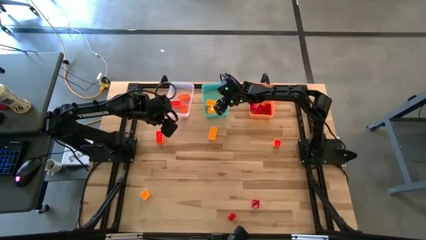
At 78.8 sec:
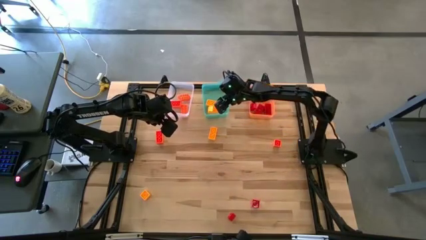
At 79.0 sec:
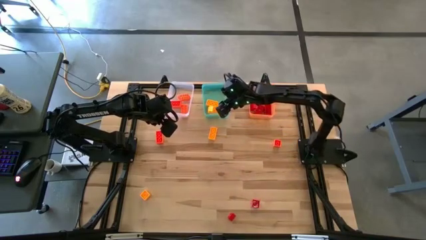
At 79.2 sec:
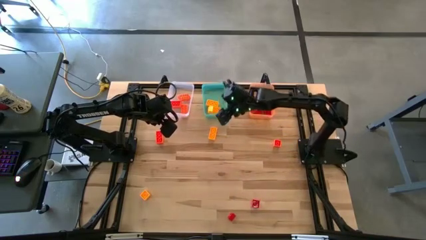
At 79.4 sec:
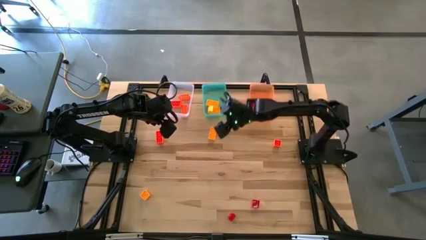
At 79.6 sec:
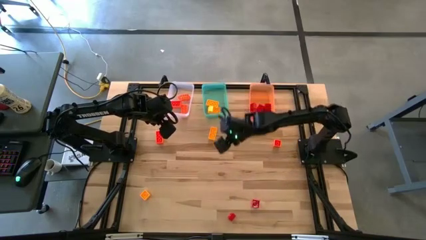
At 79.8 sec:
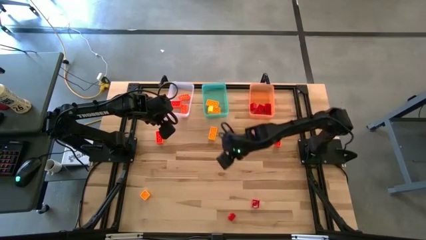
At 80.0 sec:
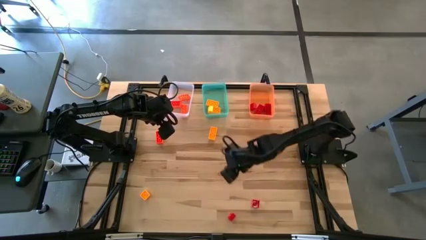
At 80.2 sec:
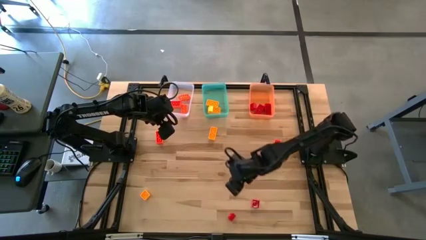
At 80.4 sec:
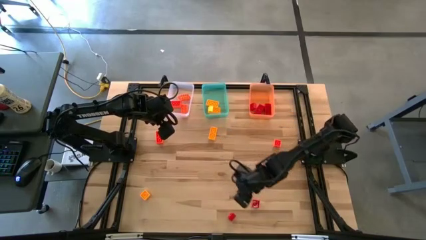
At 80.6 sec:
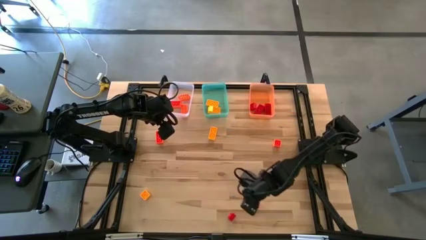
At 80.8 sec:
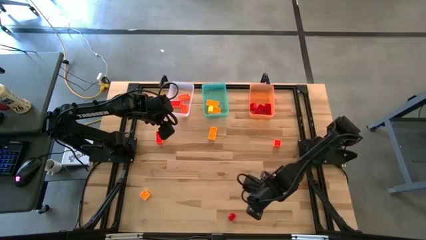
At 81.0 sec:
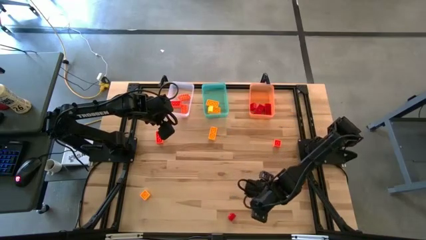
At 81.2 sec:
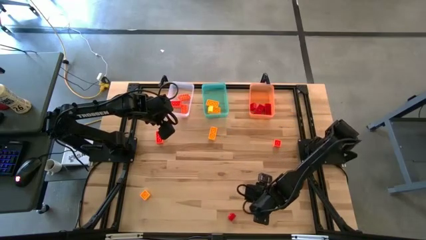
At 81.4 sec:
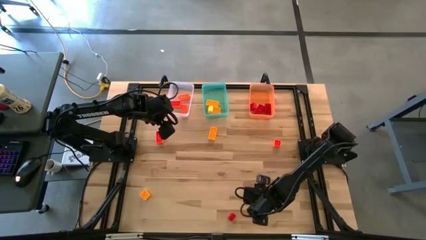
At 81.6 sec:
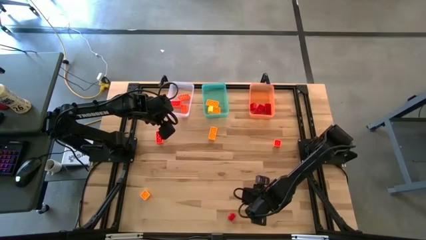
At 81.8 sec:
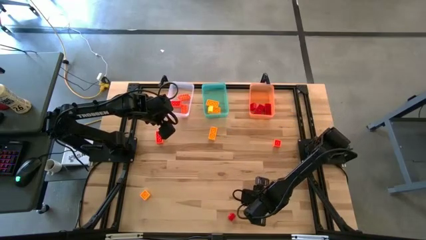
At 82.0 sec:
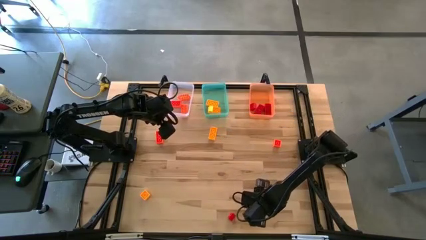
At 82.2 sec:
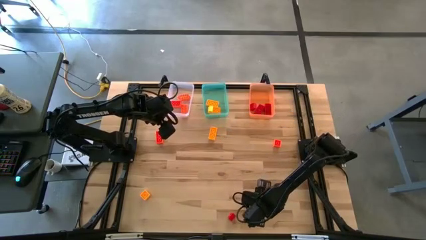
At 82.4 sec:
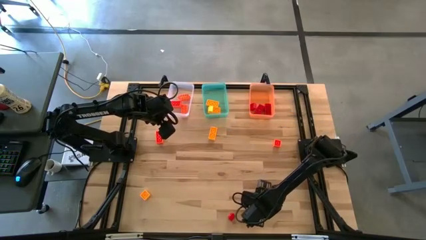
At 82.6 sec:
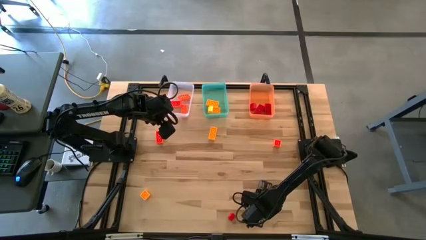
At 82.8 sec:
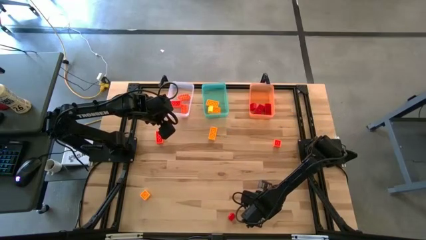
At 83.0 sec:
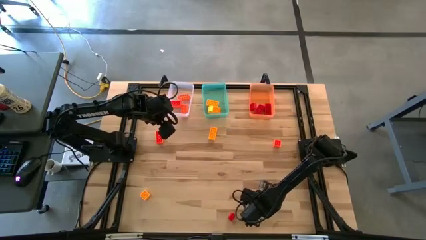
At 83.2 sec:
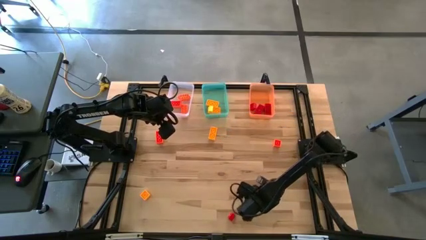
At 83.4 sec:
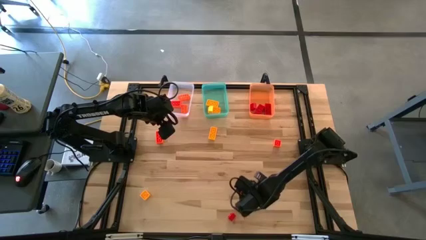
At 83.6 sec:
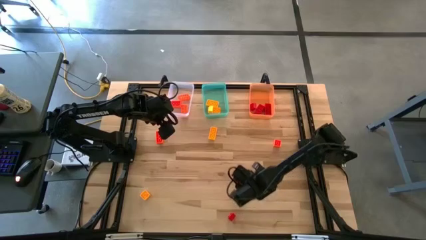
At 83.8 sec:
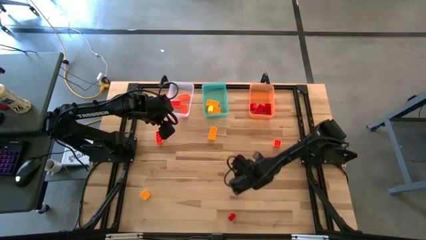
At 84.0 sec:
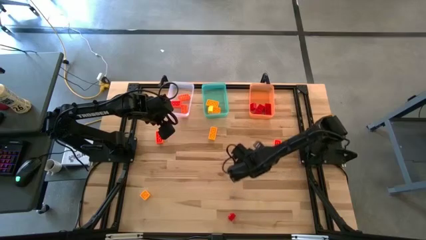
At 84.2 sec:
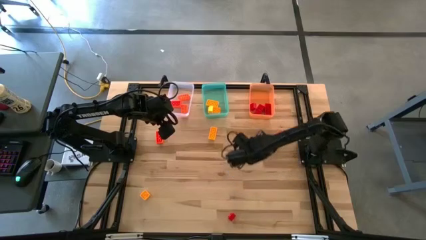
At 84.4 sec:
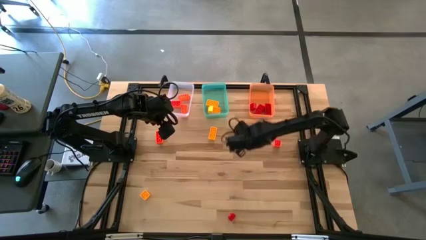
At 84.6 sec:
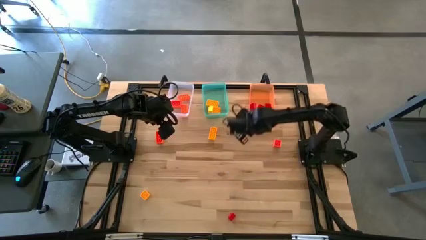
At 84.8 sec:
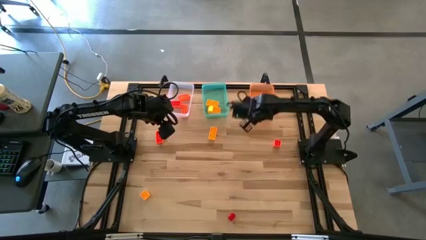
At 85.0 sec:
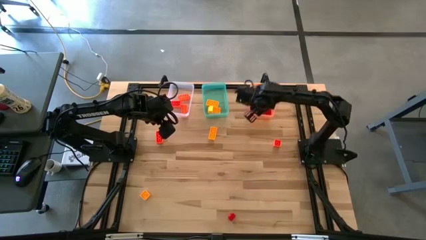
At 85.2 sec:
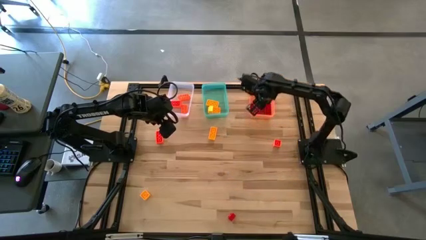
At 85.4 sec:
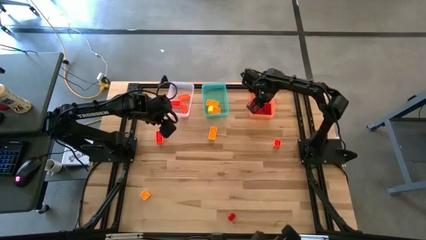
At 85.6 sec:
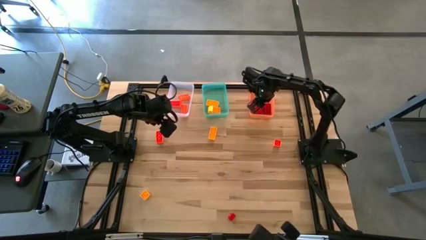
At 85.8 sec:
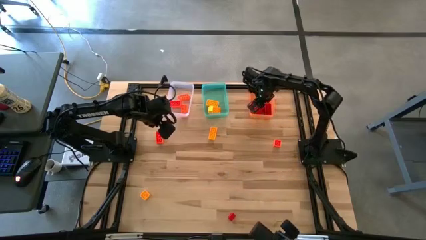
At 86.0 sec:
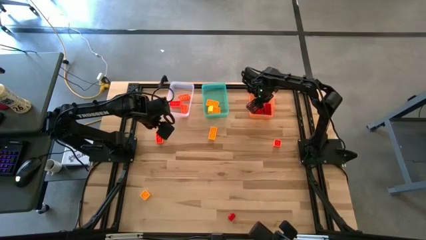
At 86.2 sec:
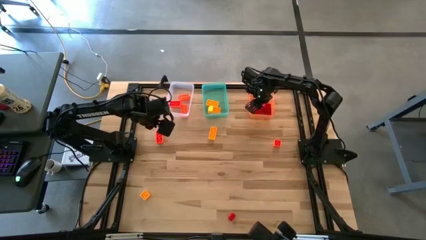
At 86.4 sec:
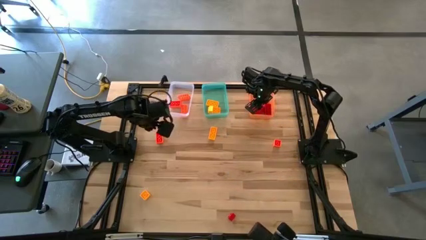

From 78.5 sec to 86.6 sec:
Task: Sort & place blocks by color
Put the red game piece into the orange bin

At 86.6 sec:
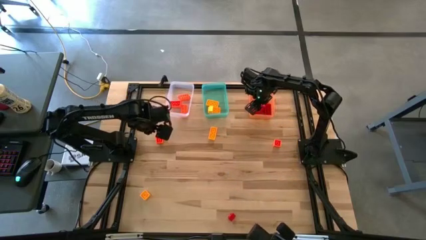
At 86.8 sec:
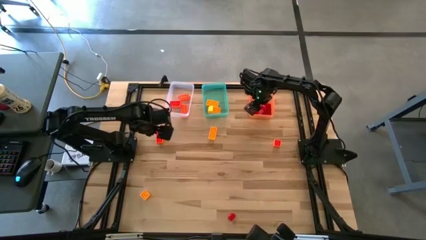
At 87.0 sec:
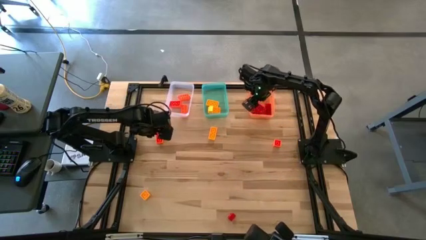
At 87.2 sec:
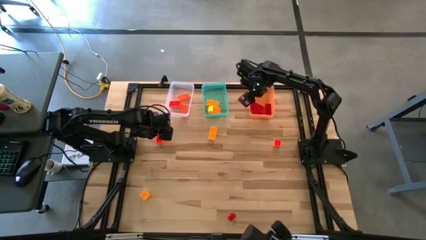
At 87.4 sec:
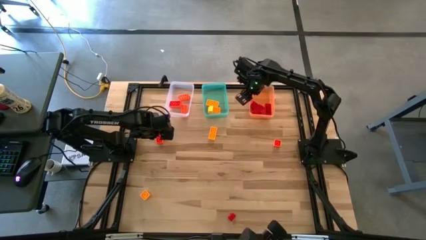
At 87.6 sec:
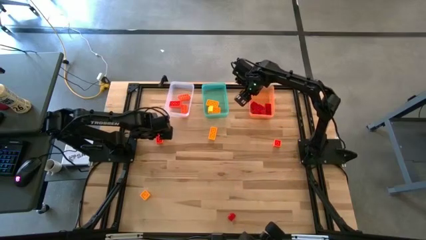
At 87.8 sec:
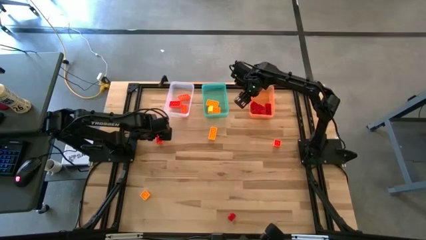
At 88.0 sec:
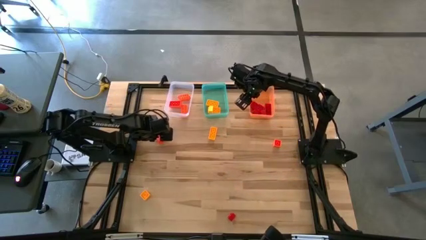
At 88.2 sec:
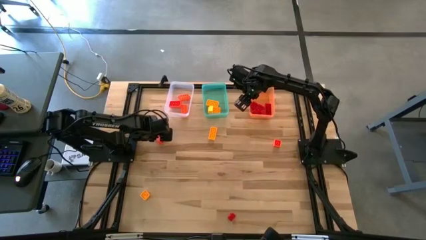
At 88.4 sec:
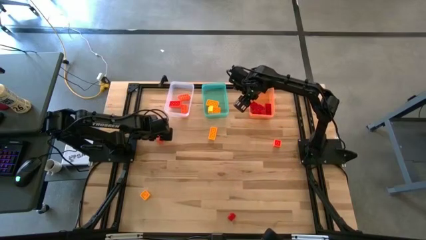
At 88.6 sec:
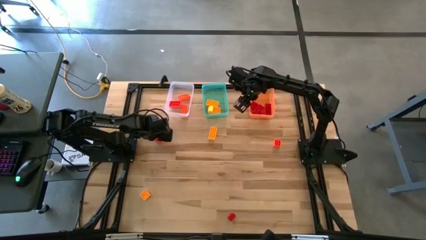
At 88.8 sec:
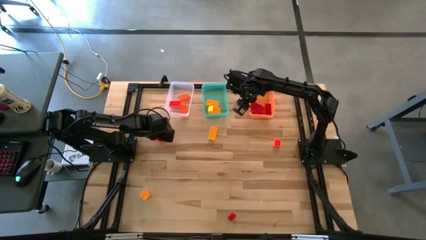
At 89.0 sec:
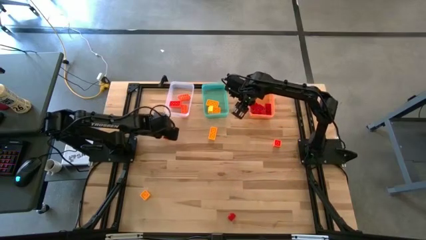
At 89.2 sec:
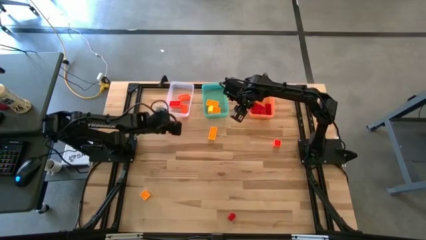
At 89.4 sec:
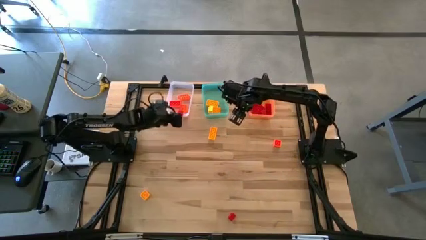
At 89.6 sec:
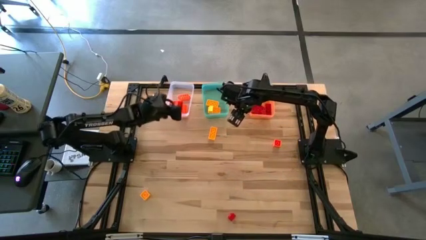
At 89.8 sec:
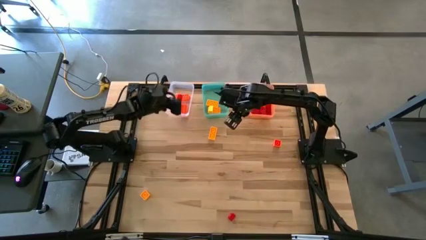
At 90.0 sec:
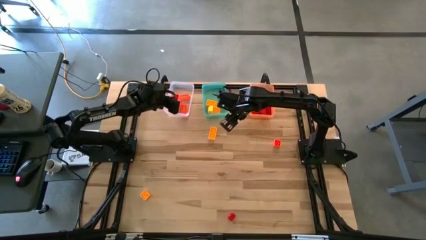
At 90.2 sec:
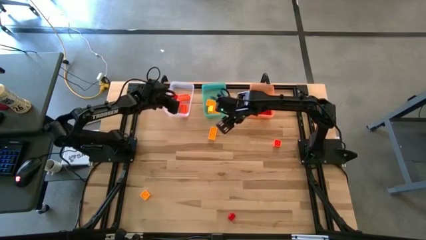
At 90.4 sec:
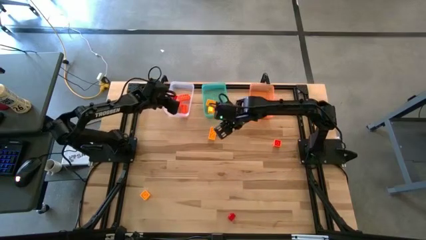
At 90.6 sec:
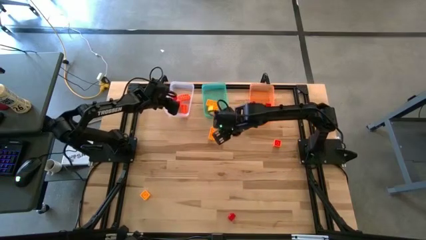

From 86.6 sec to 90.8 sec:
Put the orange game piece into the transparent bin

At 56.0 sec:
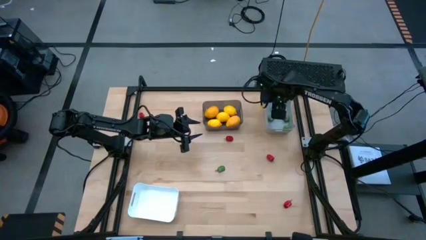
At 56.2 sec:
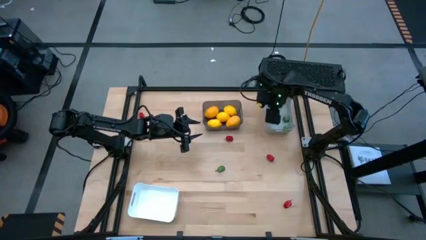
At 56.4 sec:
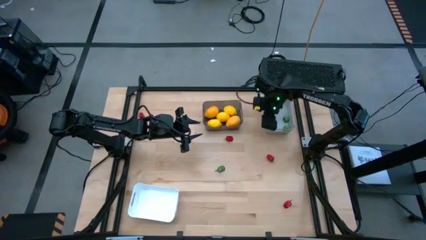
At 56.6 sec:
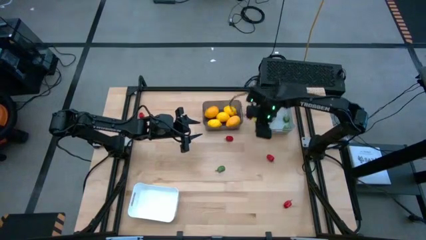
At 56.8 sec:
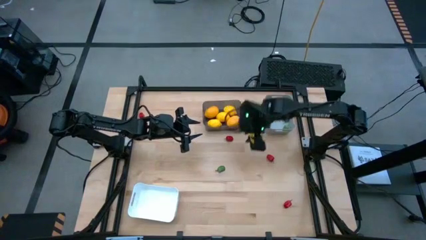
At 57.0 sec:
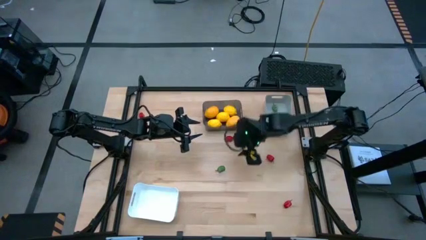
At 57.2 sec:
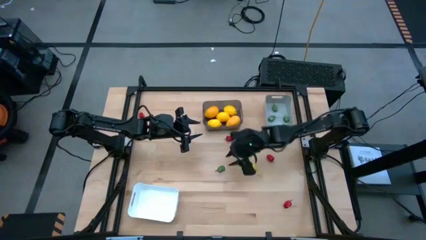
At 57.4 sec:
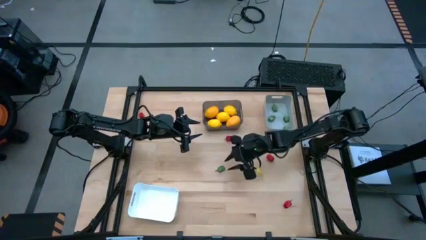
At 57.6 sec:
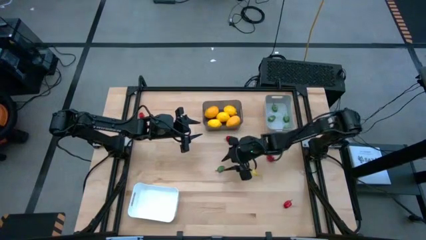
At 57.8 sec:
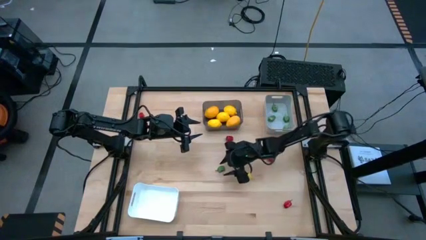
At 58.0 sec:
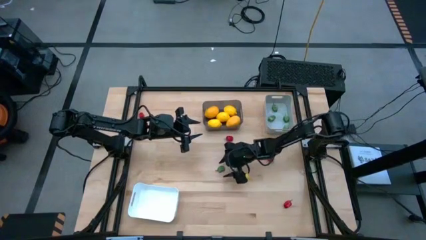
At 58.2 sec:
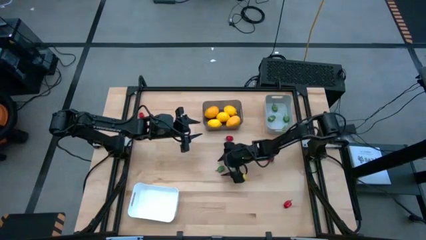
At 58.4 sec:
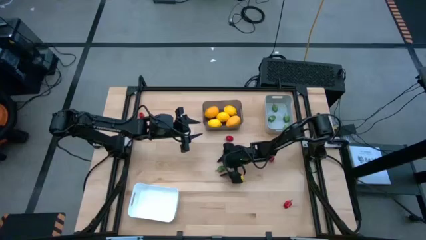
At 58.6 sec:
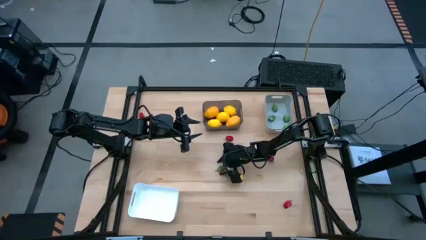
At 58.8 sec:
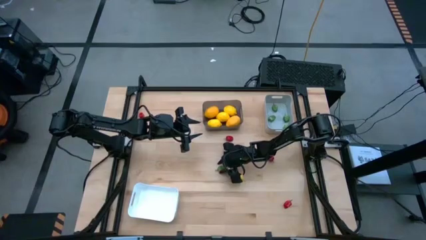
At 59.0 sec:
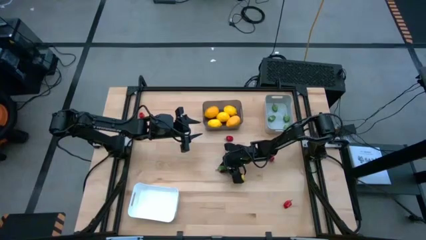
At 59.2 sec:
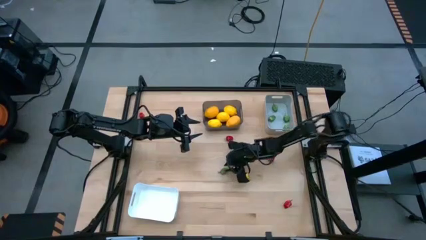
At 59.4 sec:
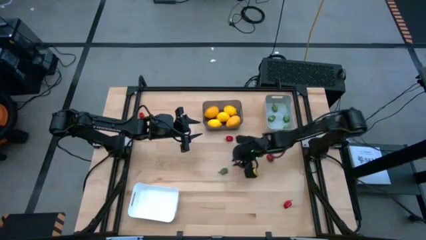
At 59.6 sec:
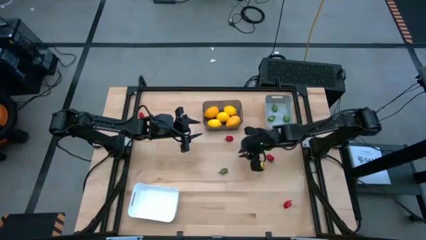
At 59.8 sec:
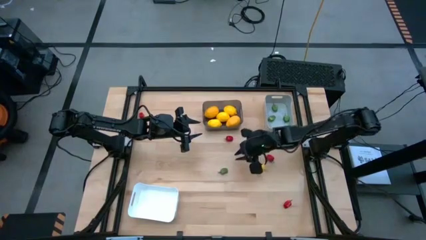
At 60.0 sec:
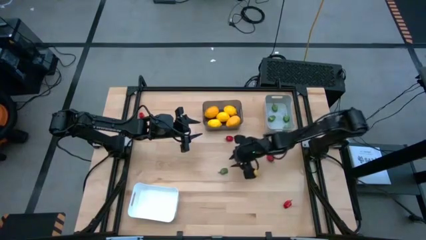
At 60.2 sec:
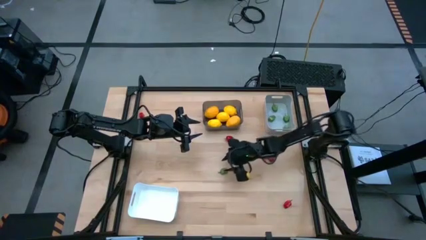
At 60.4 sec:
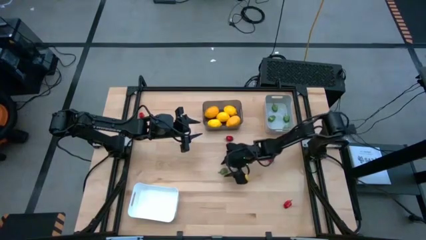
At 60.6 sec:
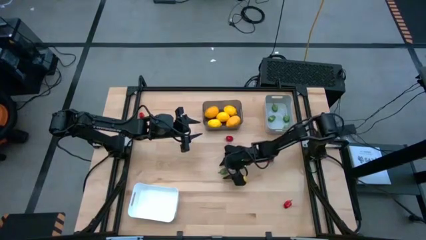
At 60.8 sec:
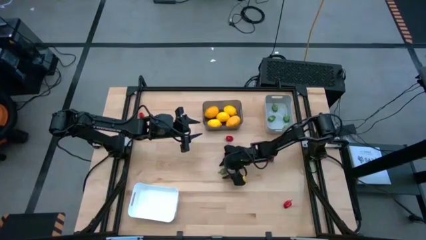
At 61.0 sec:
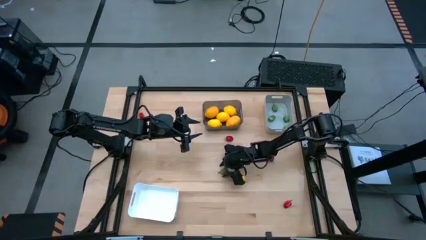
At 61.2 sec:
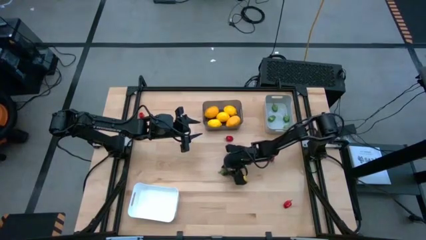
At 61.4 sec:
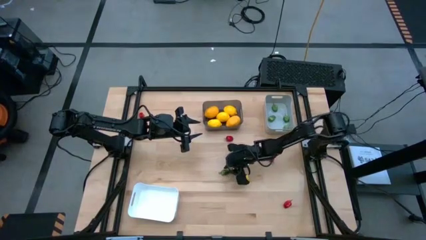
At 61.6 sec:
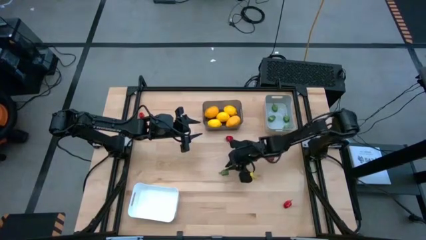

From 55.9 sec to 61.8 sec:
Task: Sort produce into baskets
Put the green pepper into the gray bin
